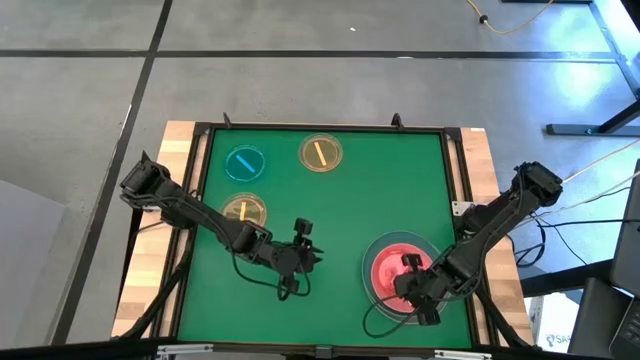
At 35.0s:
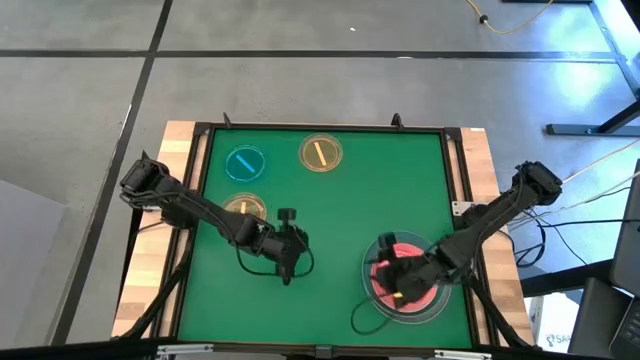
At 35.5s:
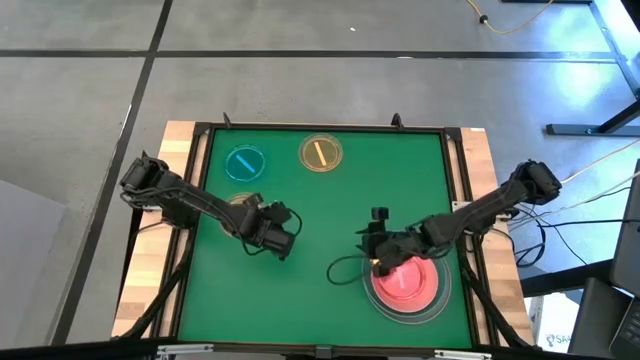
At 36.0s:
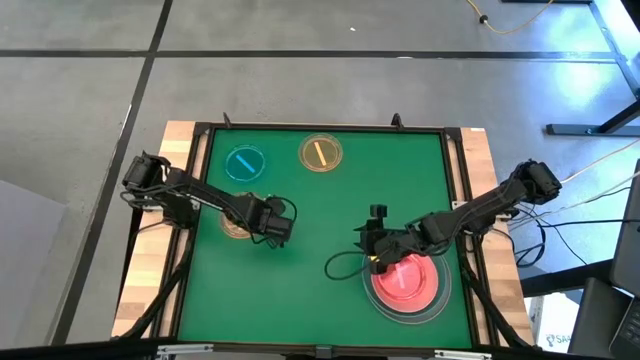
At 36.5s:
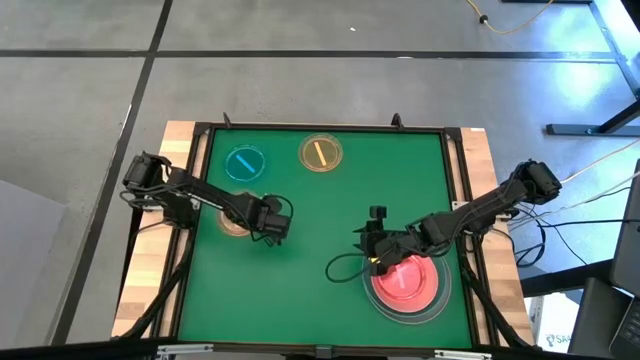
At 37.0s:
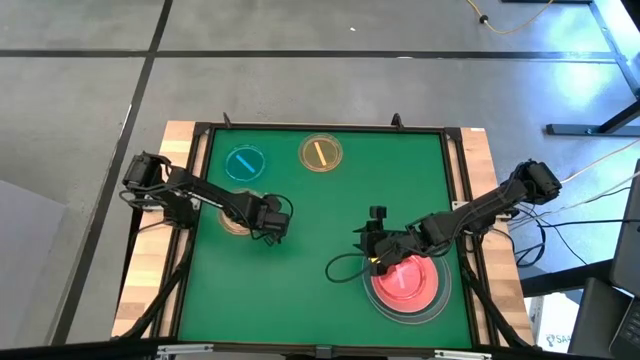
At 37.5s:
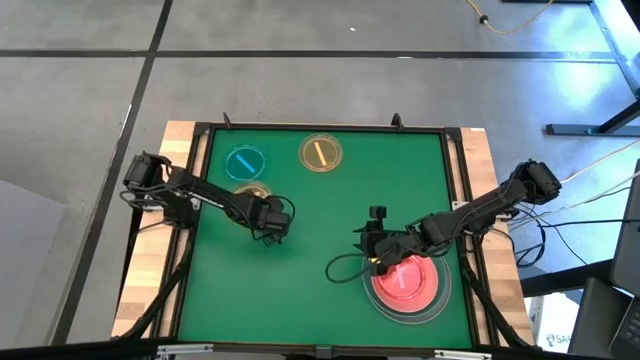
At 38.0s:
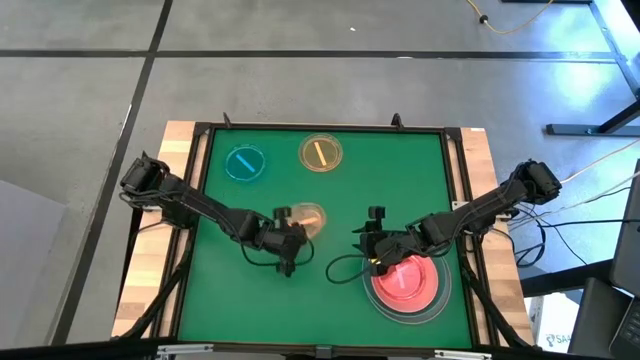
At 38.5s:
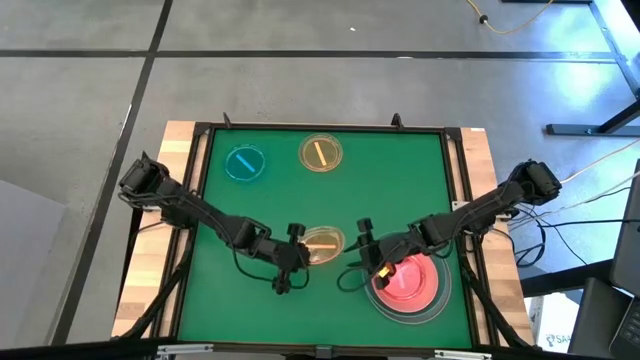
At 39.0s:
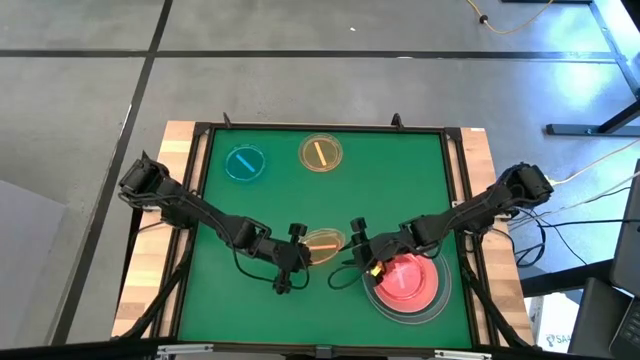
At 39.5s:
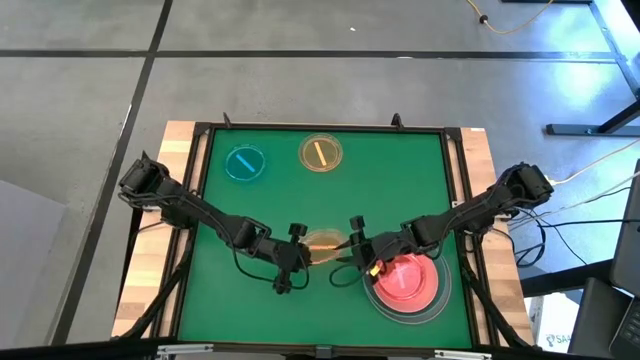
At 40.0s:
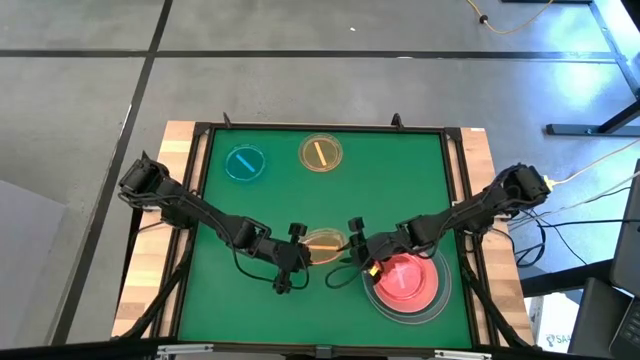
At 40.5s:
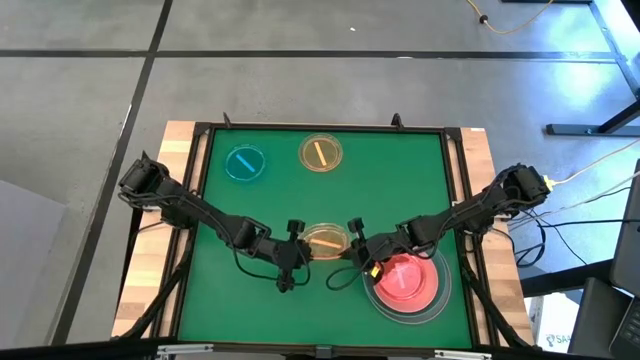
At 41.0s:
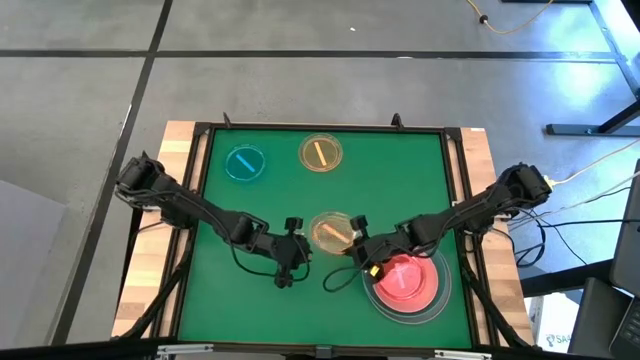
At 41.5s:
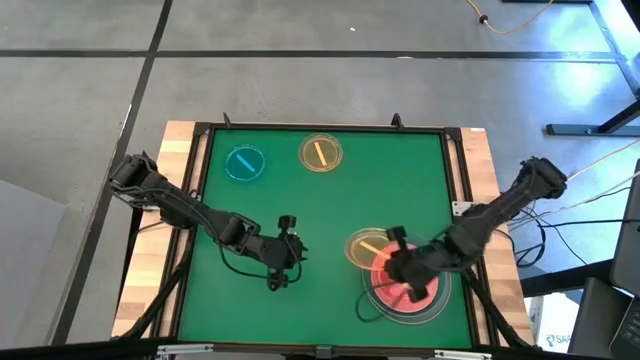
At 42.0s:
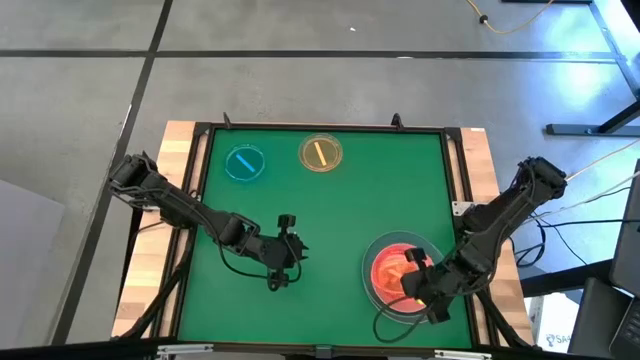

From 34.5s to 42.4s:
Task: Stack plastic plates
Stack the bottom yellow plate on top of the pink plate

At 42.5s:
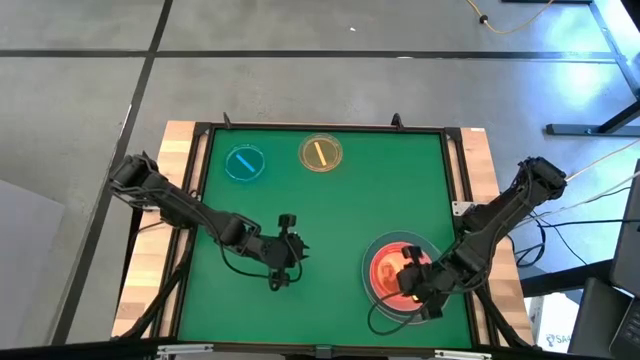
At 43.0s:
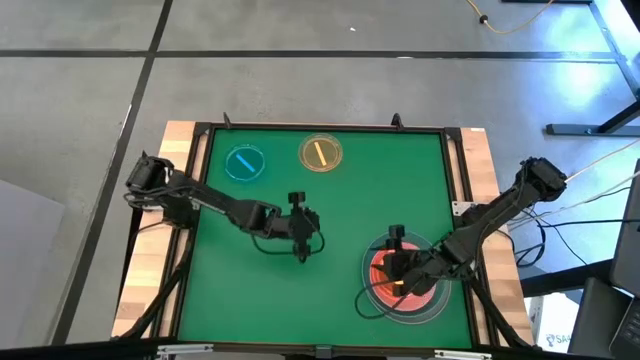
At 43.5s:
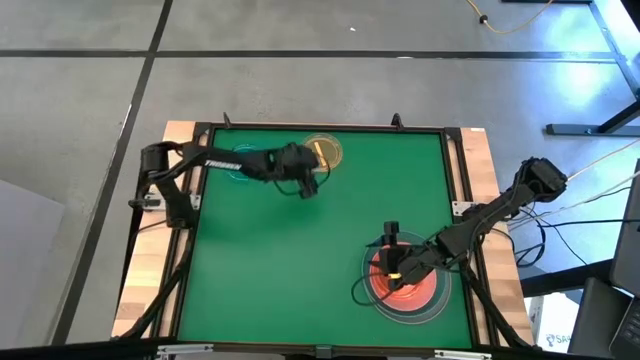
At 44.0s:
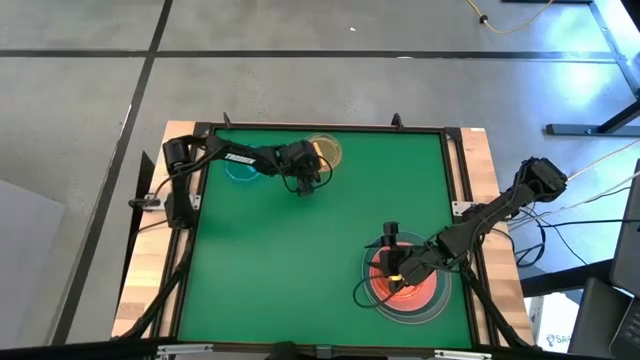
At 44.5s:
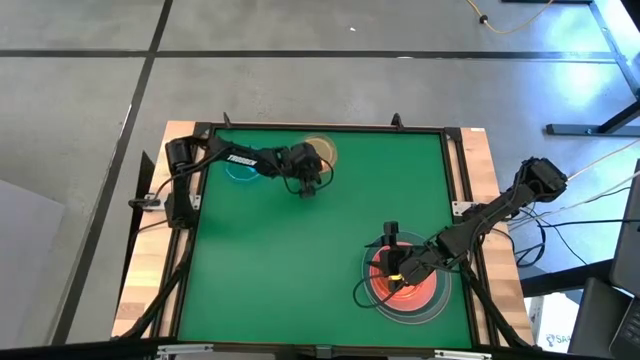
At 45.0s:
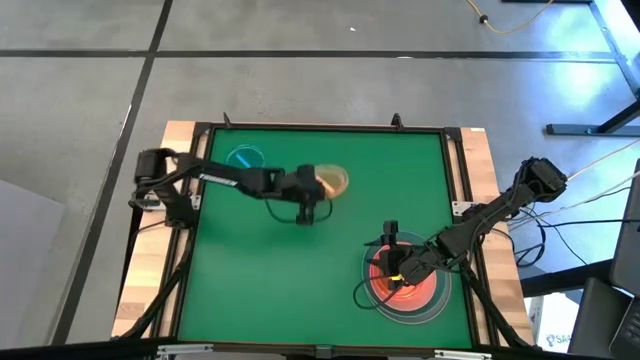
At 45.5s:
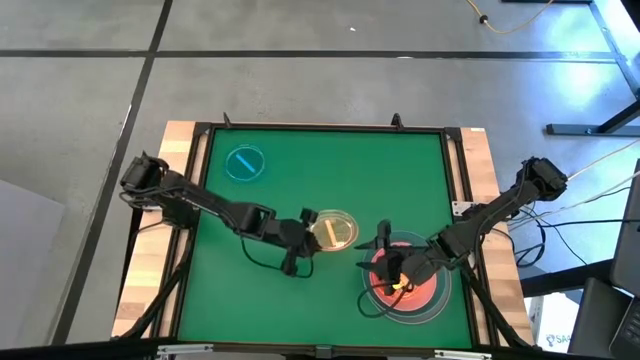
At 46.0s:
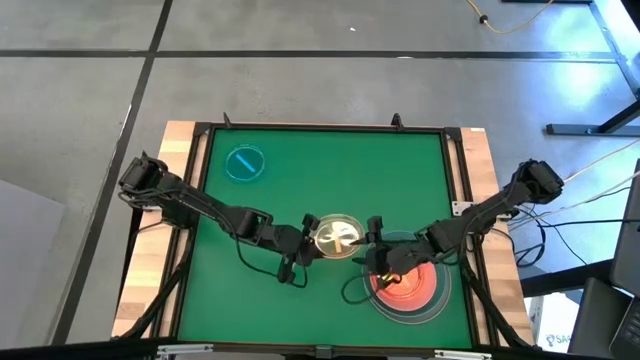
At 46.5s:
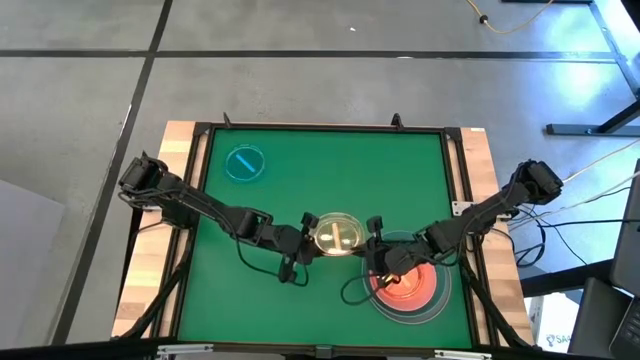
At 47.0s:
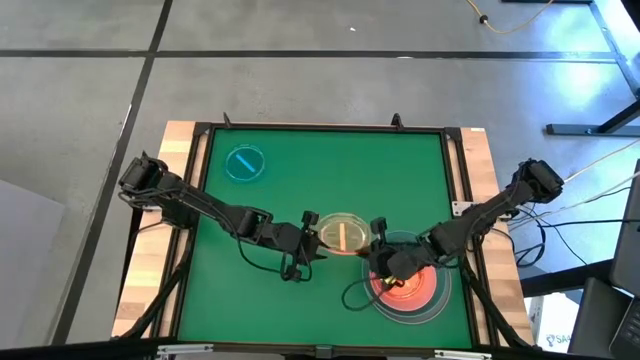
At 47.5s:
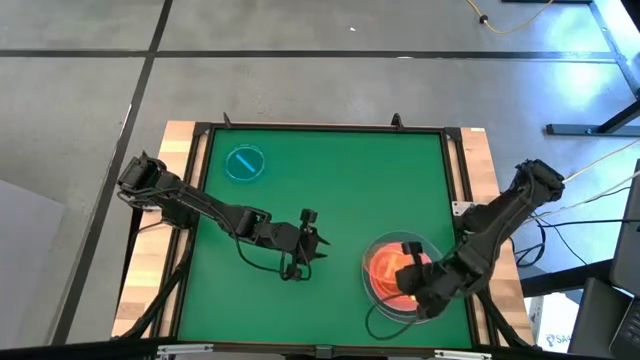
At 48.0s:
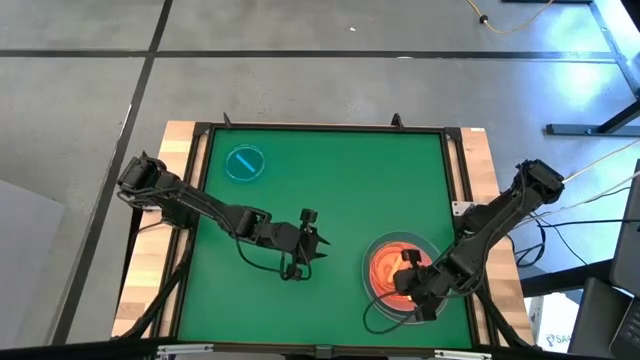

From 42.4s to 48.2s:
Stack the yellow plate on top of the yellow plate

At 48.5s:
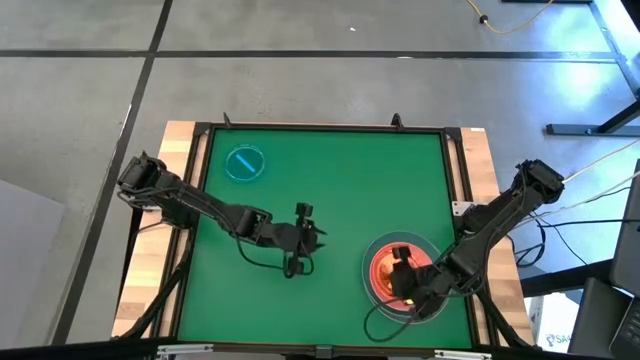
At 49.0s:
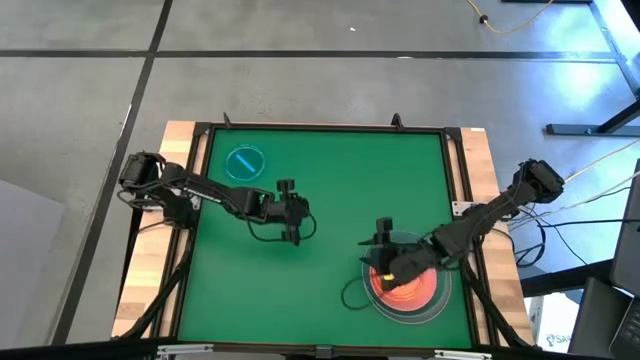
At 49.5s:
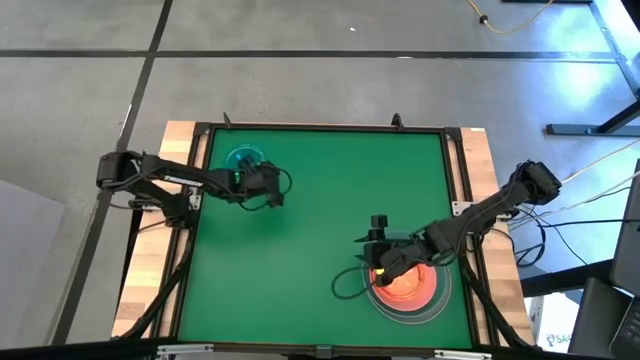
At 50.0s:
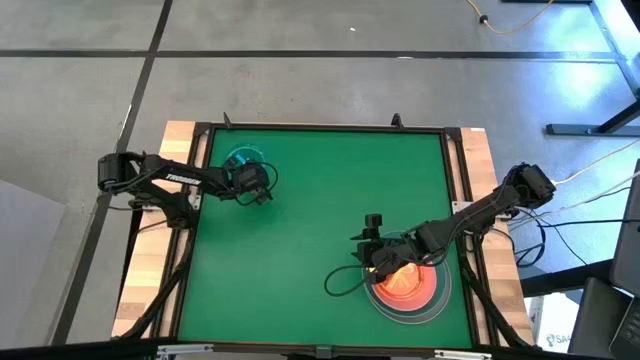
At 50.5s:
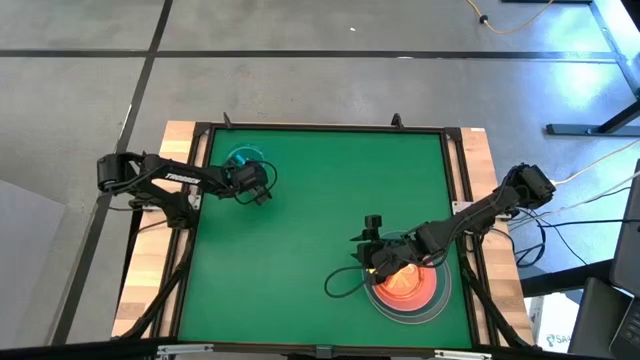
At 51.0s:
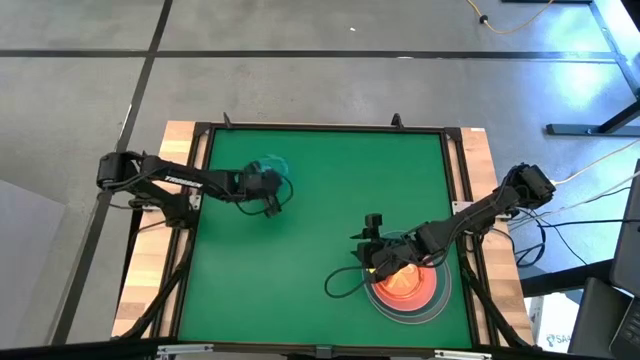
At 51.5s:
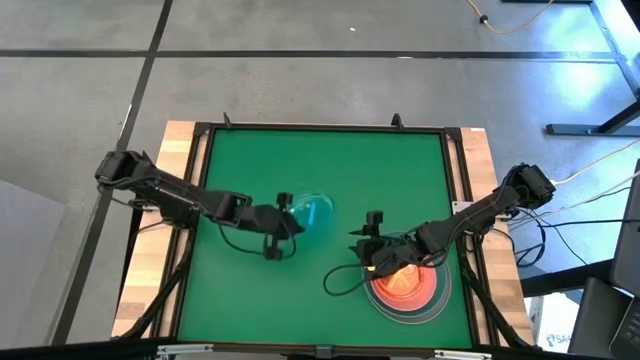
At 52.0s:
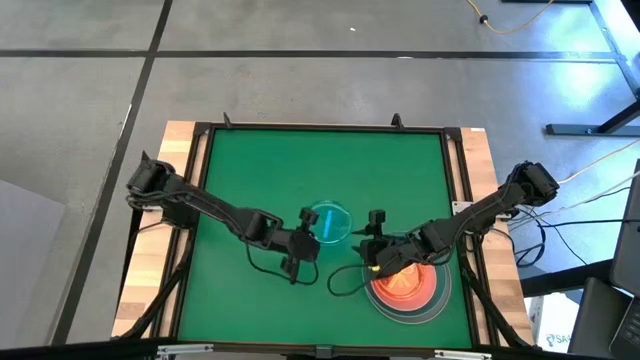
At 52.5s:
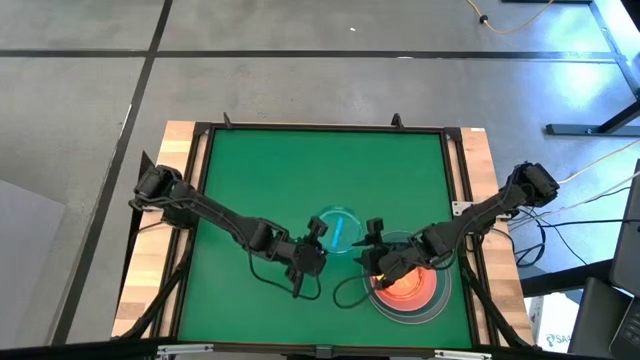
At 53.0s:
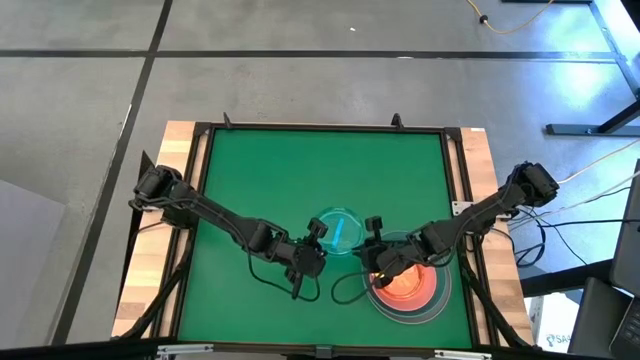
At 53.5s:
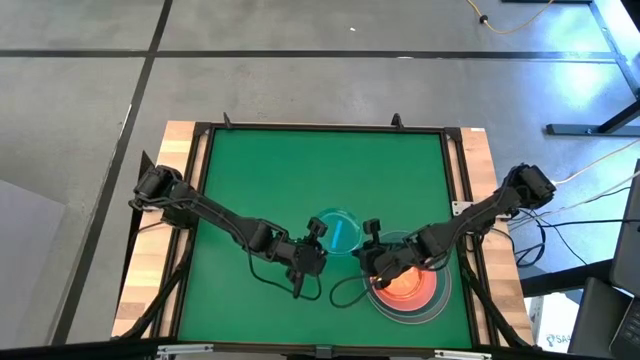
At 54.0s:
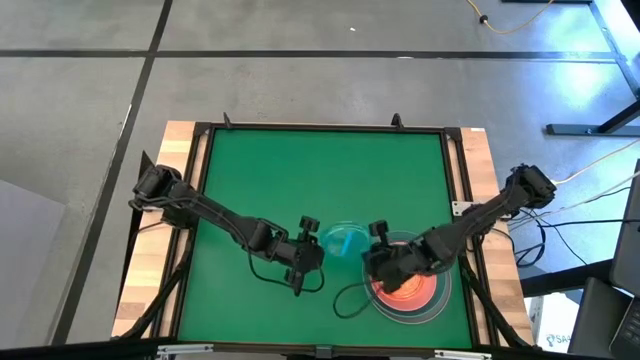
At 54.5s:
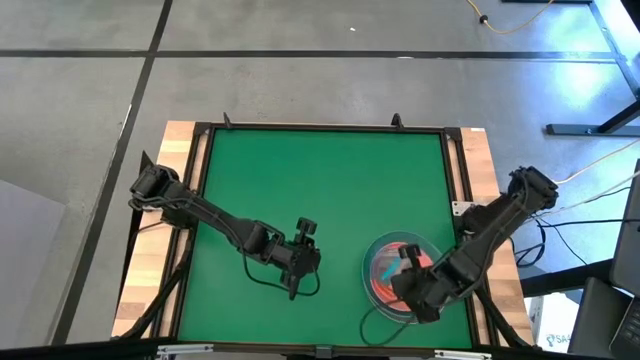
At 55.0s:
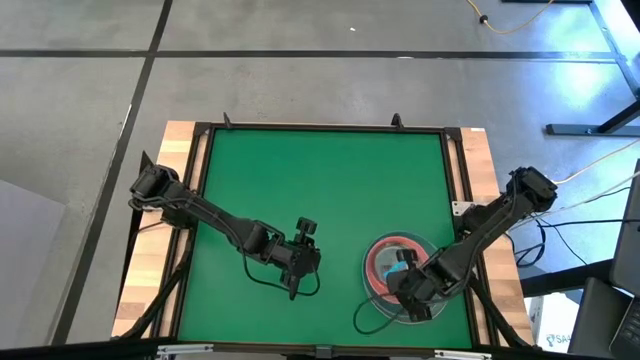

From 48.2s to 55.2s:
Stack the blue plate on top of the yellow plate

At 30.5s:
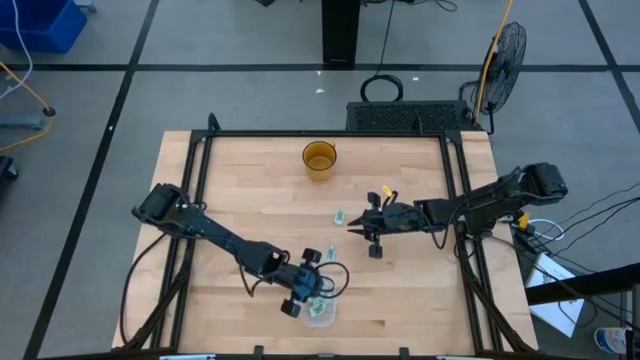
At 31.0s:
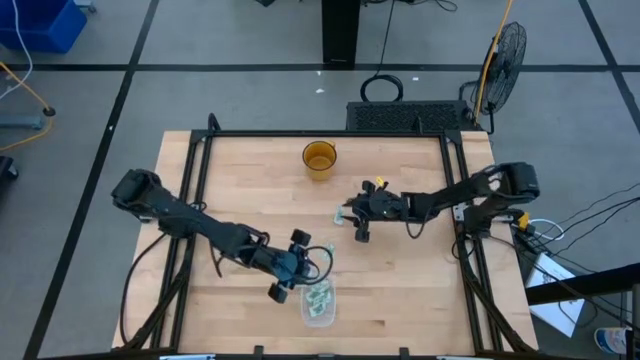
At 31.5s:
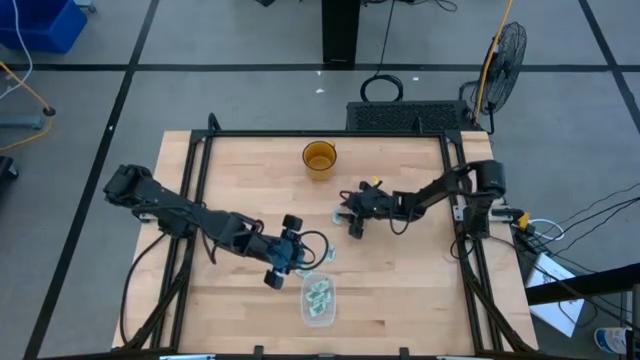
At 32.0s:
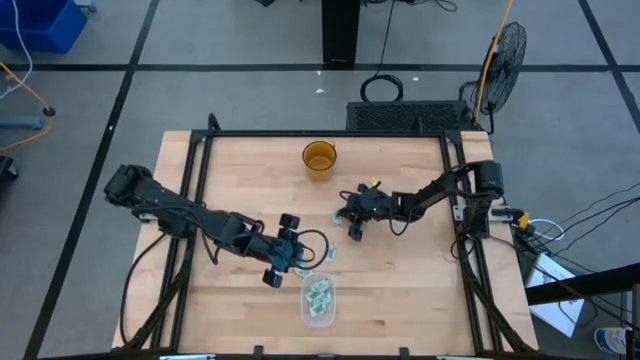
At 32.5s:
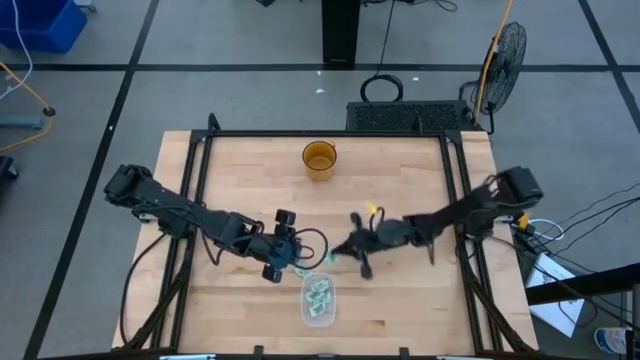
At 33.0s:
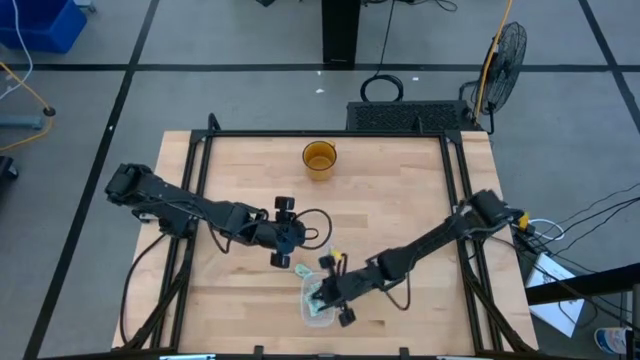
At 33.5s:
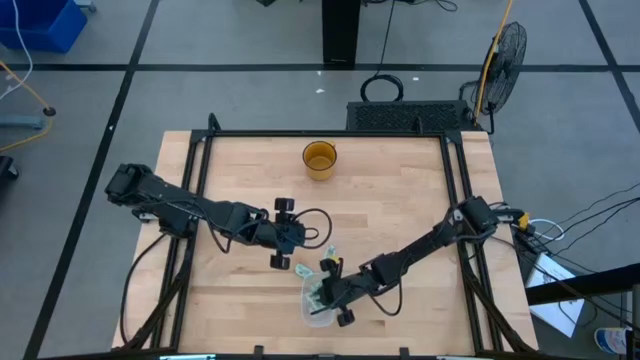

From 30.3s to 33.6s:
Task: Pick and place Stevia / Truvia into bins
Put the green stevia packet into the transparent container
